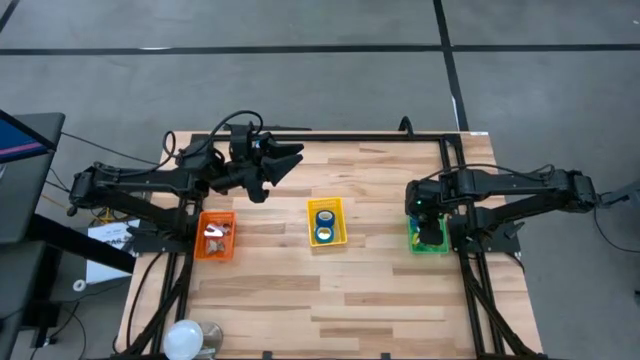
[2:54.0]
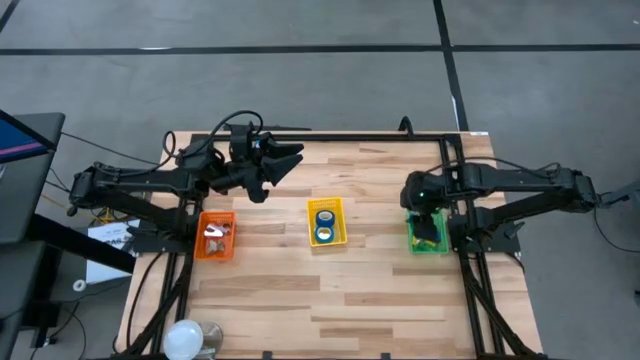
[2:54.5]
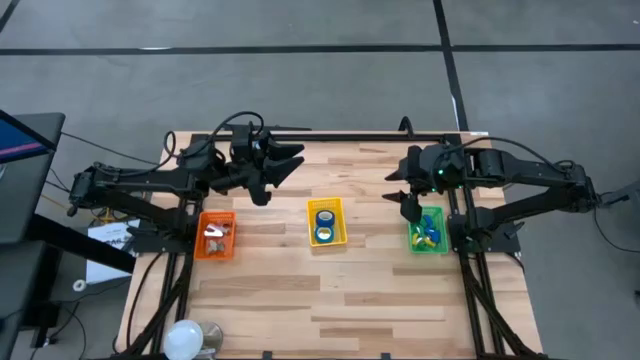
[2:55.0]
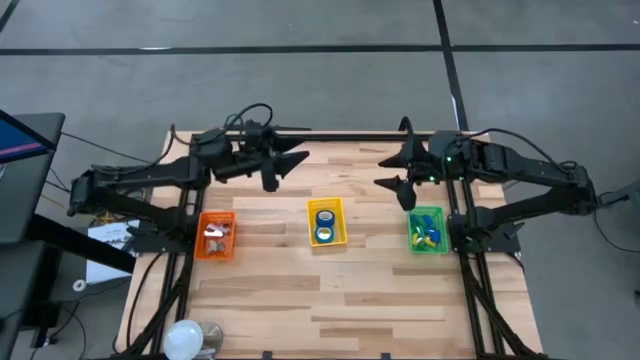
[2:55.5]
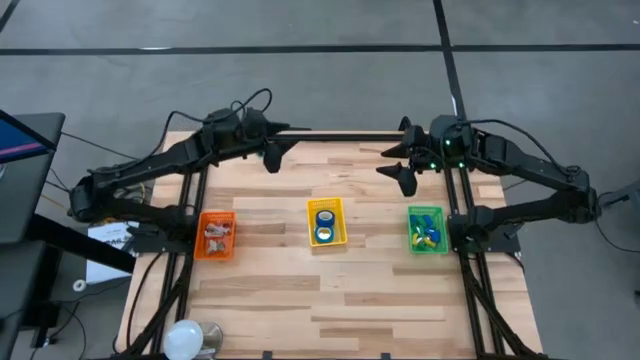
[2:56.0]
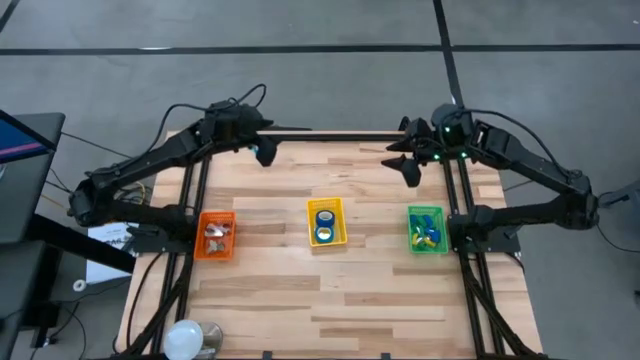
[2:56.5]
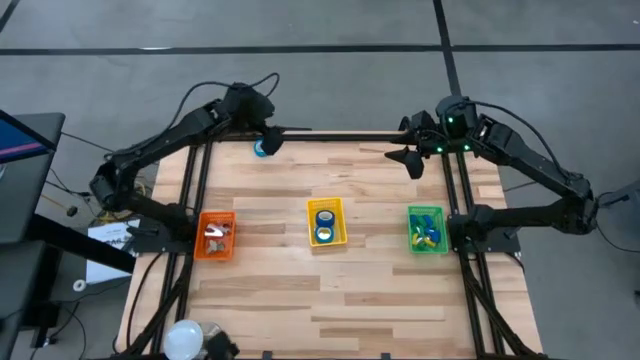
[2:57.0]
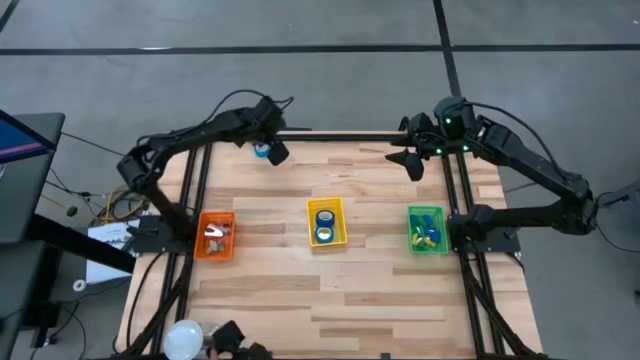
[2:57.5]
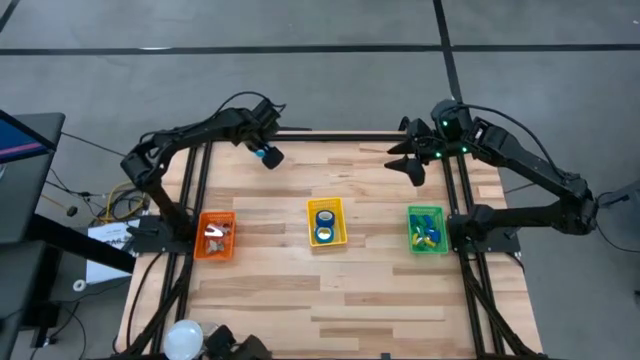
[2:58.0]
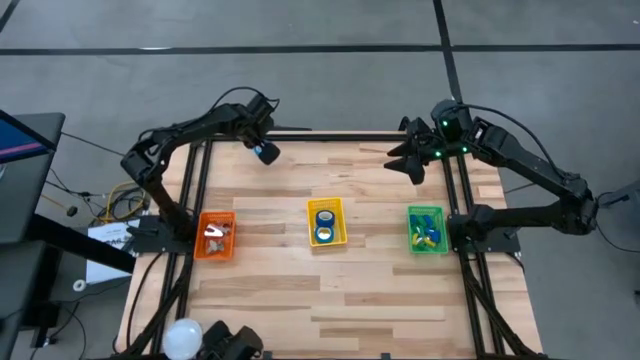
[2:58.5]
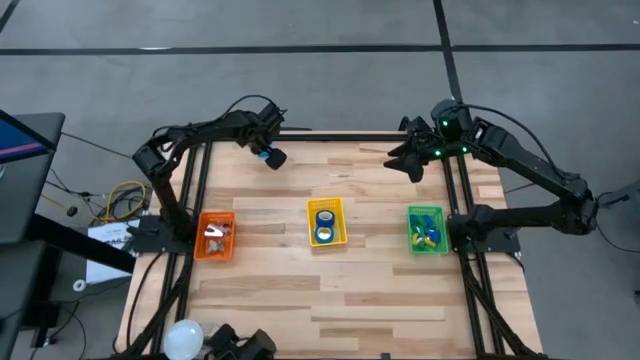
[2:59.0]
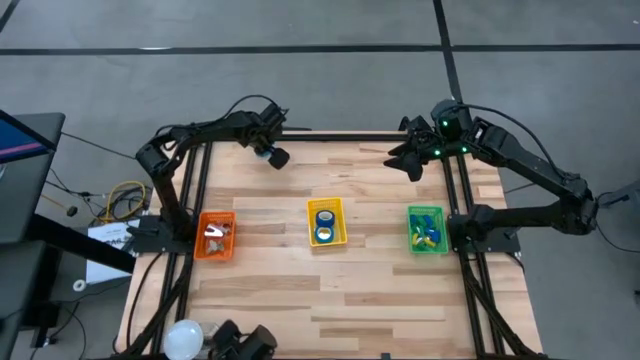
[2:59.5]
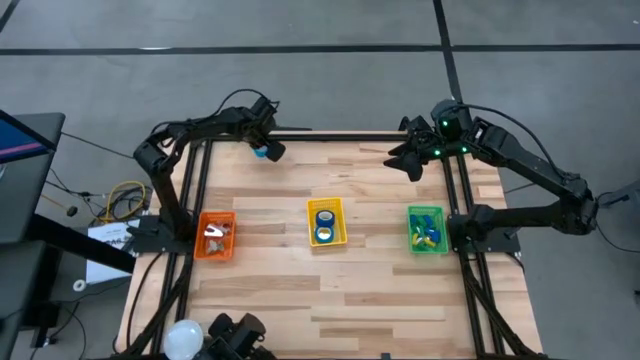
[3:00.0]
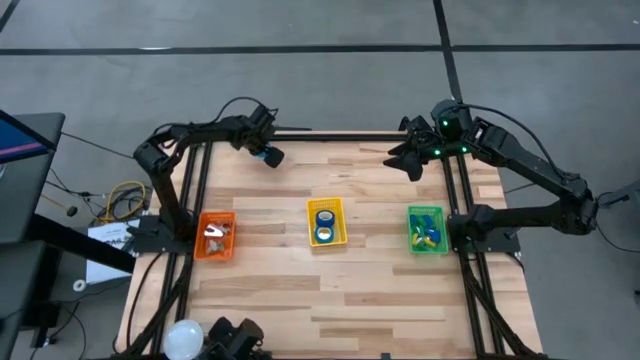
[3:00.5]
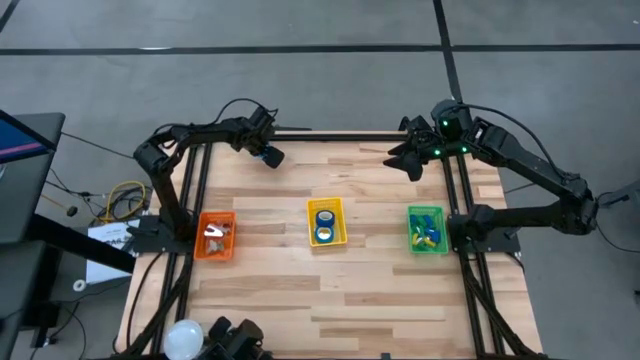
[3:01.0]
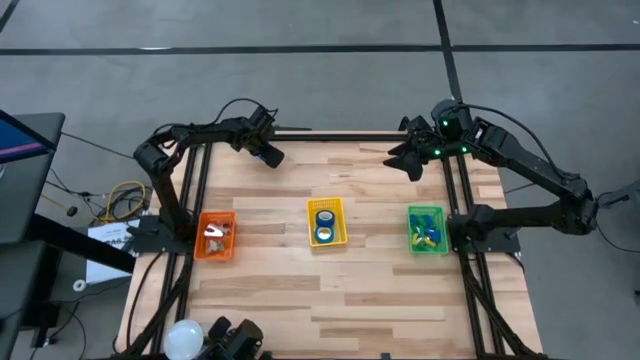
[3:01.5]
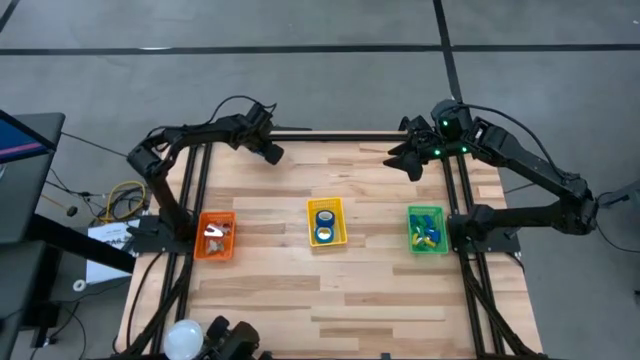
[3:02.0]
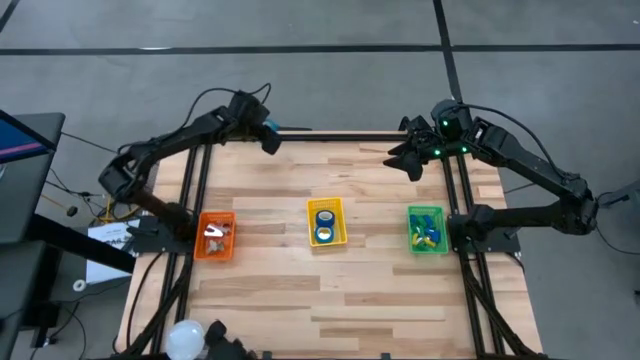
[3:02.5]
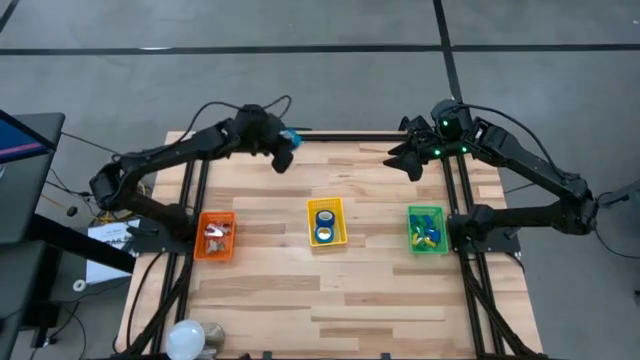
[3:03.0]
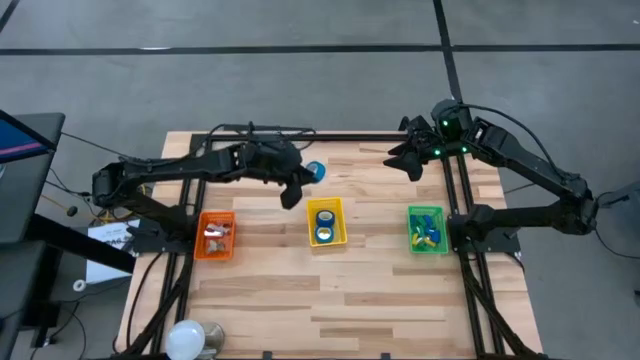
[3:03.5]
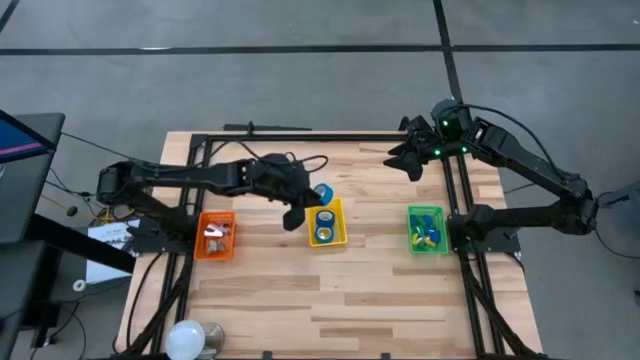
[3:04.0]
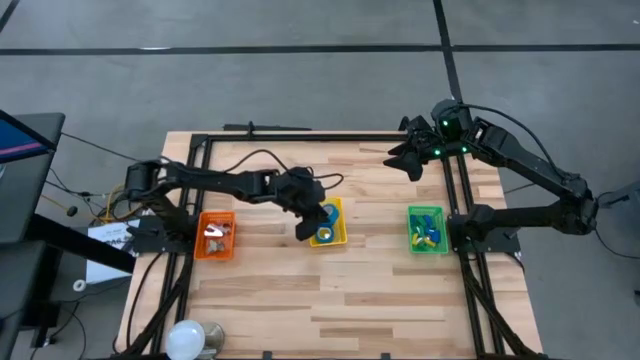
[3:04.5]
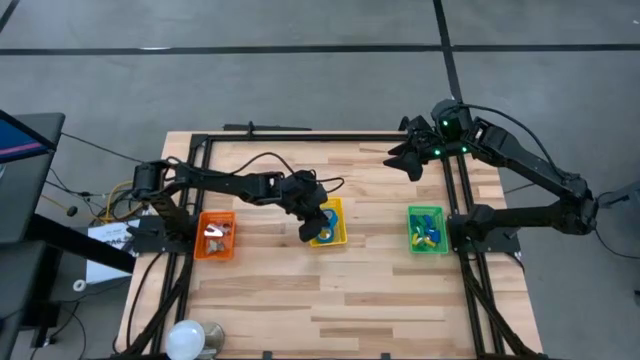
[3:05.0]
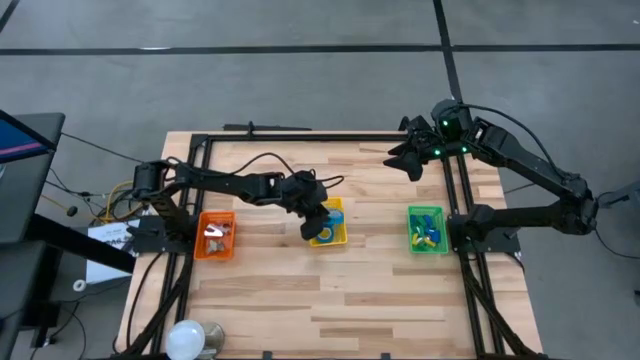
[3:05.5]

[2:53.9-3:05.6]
Task: Pick and place Stapler, Stapler remover, tape
Put the blue tape into the yellow basket

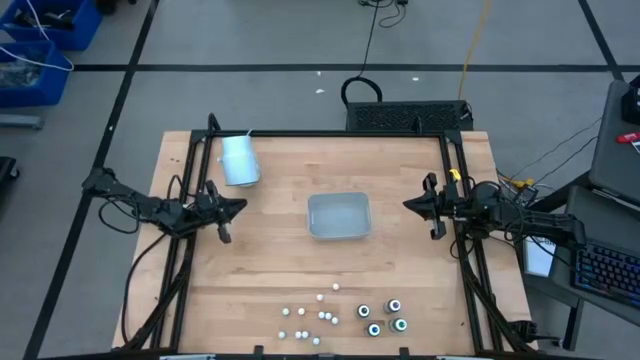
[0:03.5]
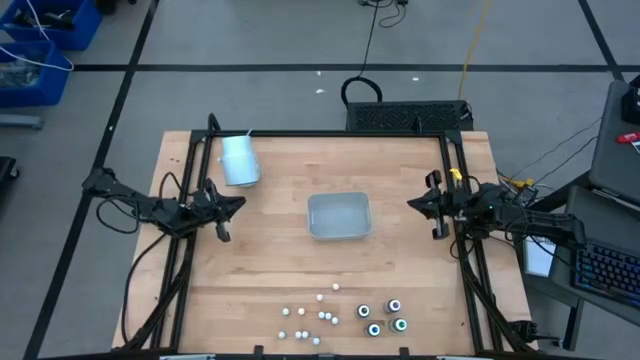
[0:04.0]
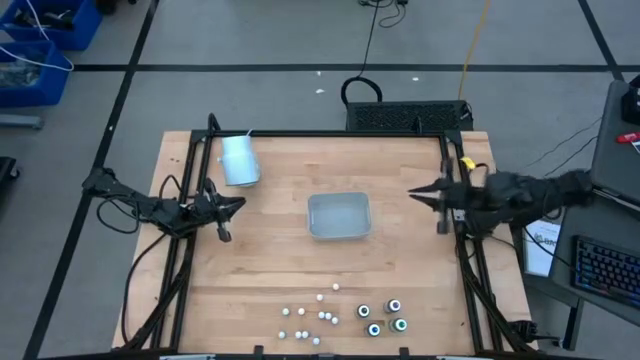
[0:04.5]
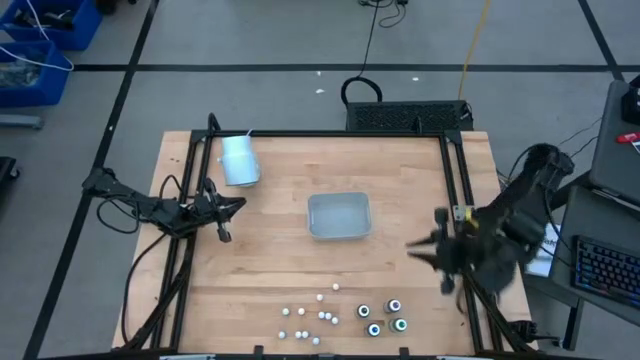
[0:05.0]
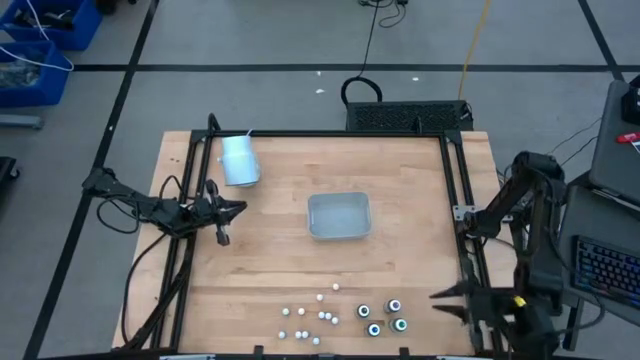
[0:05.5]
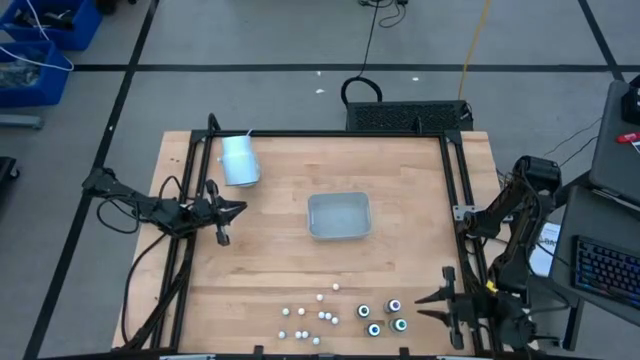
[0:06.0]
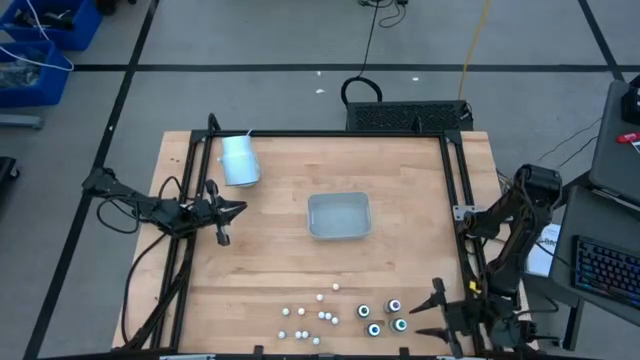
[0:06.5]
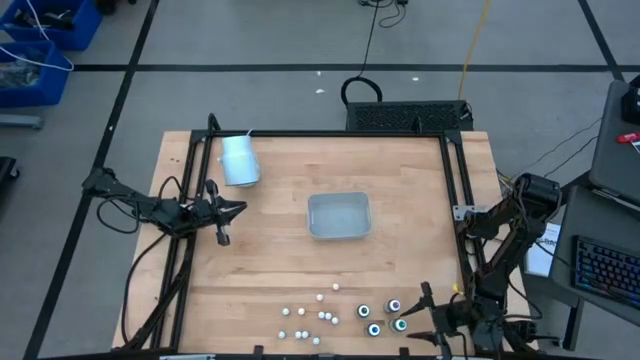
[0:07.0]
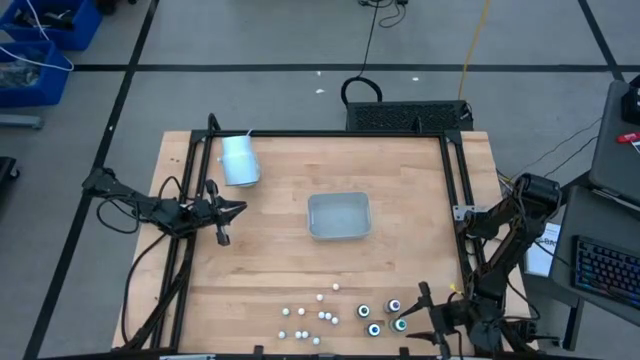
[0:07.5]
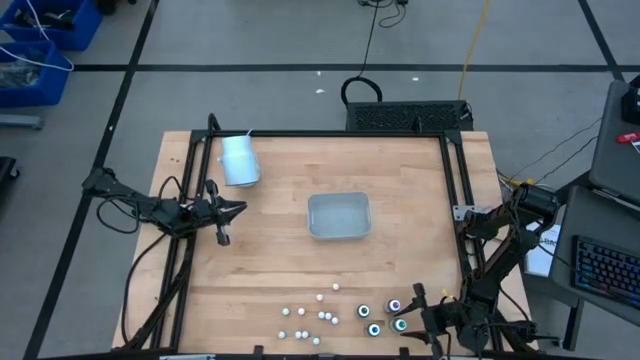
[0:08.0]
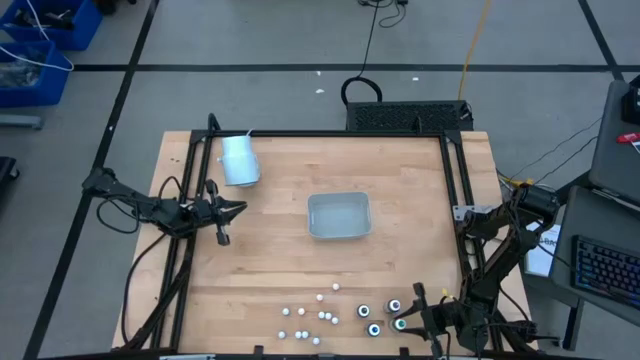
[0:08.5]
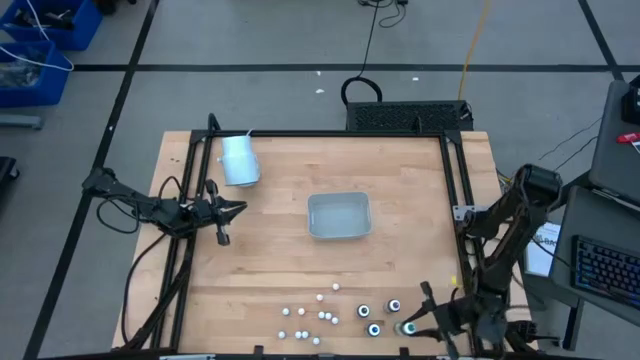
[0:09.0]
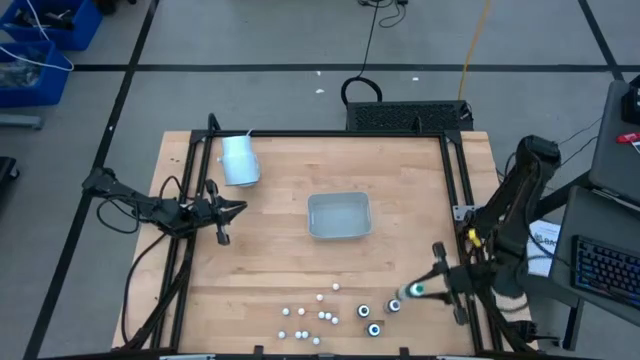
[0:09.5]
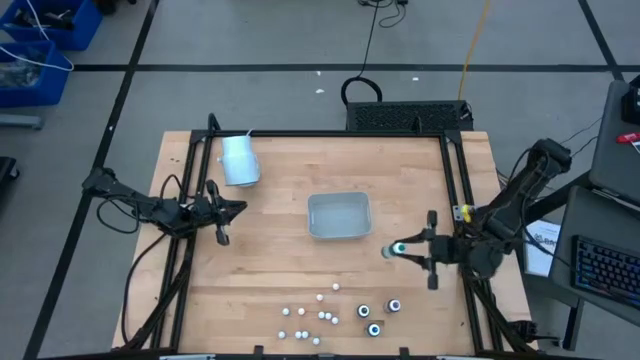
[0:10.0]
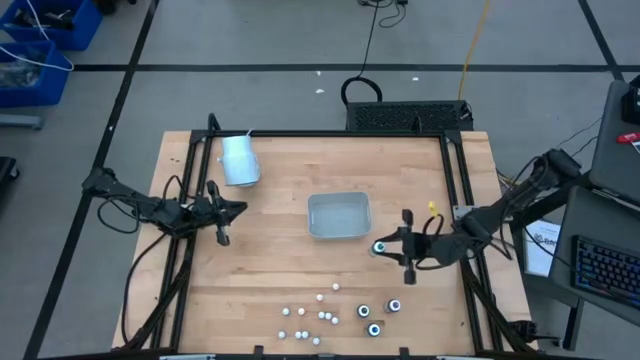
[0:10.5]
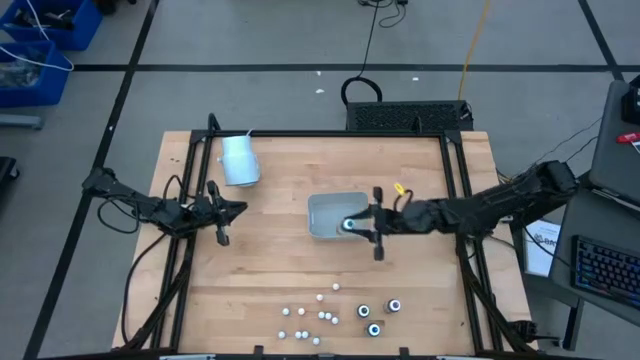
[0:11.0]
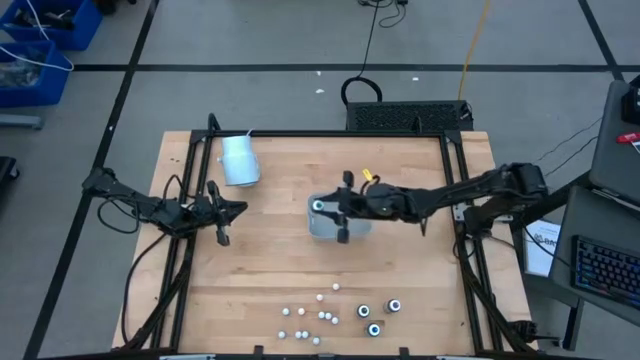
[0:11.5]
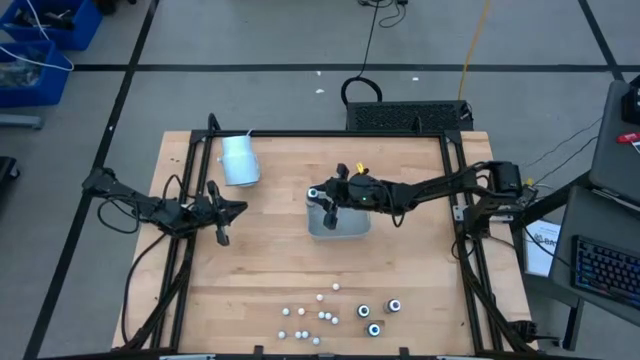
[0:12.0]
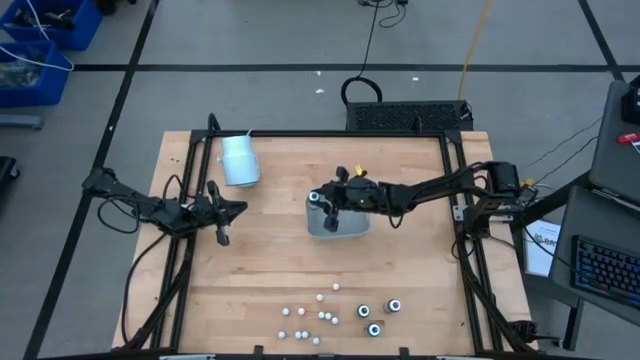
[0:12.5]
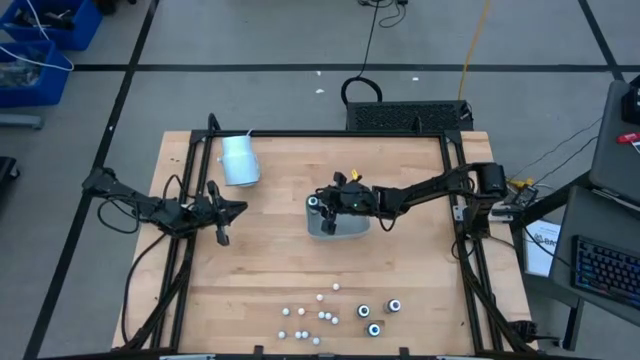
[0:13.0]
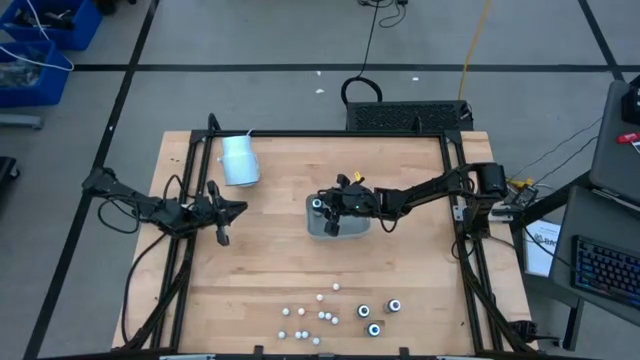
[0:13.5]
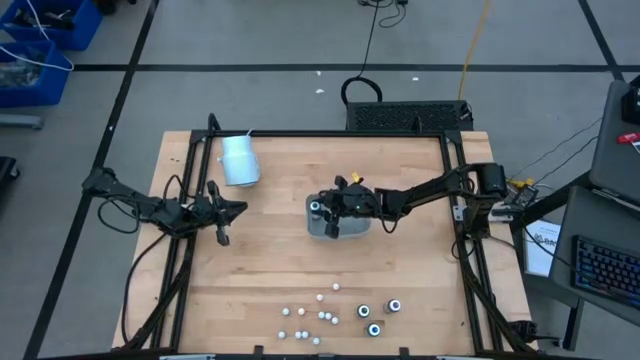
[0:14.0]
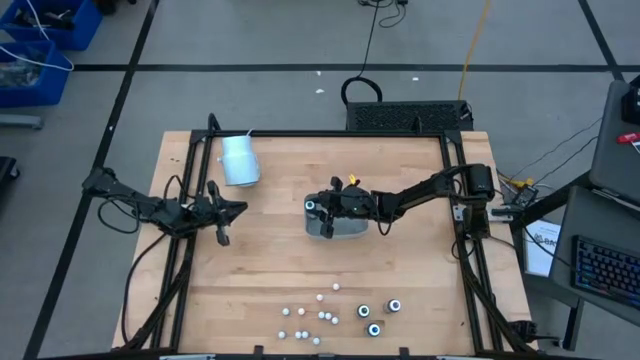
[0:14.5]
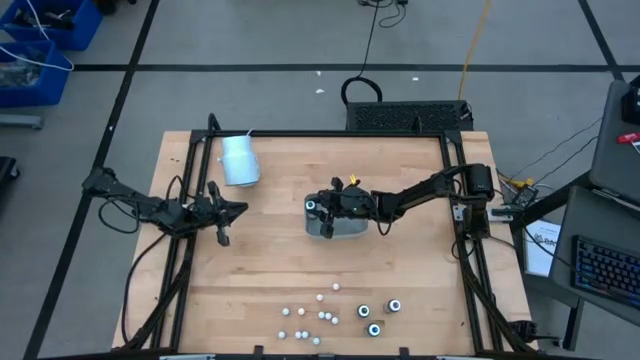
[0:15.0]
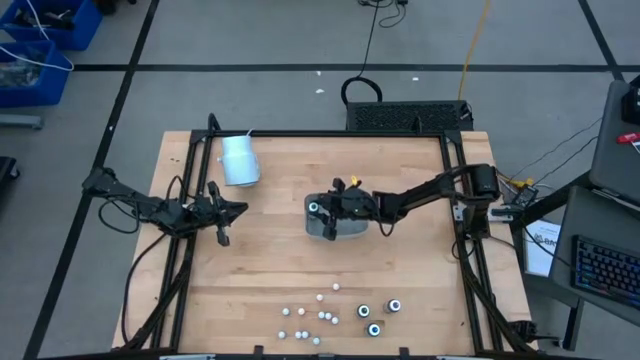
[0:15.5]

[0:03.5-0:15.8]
Task: Pick & Place food coloring
Put the green food coloring bottle into the bin
